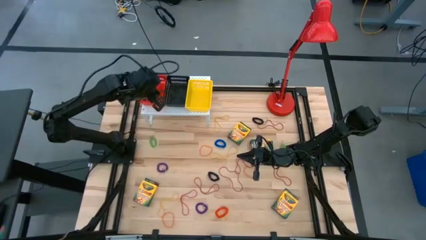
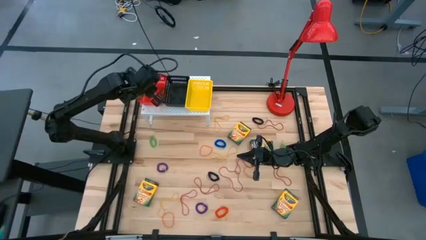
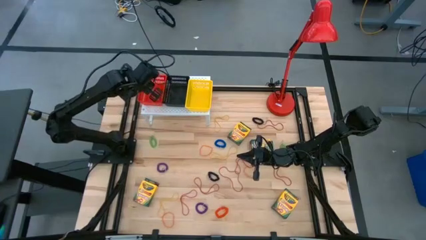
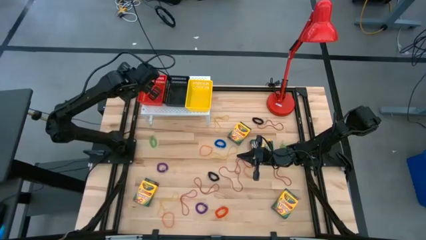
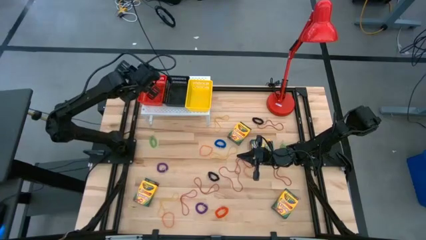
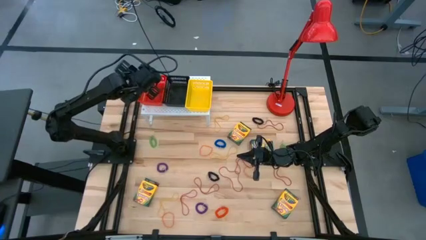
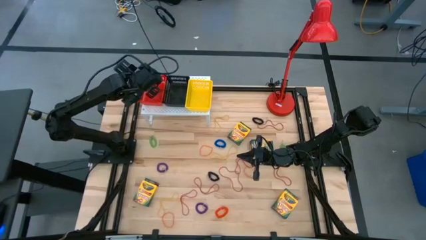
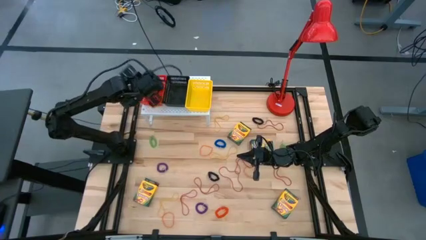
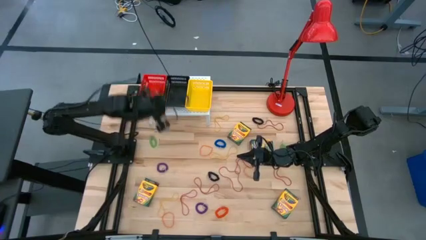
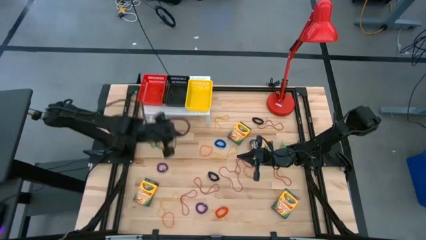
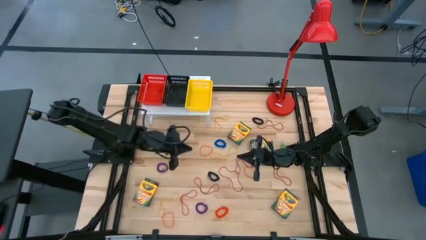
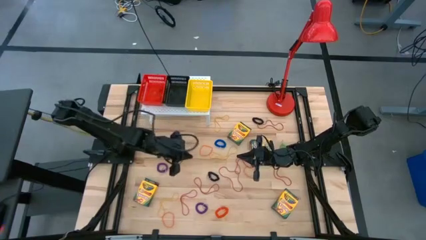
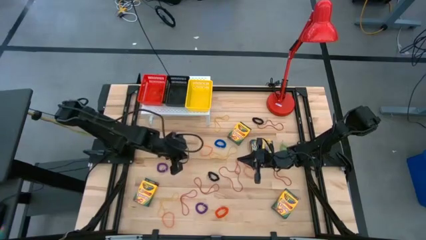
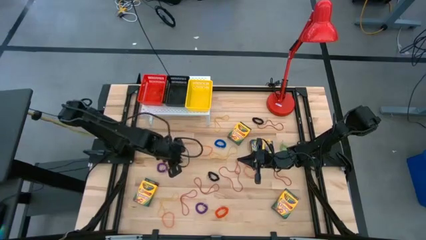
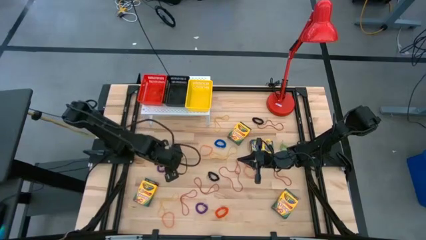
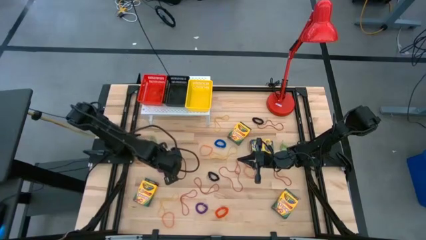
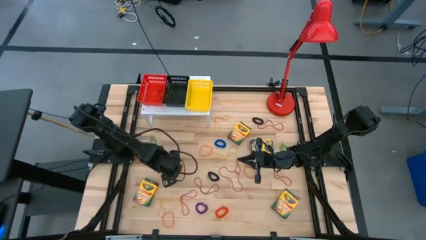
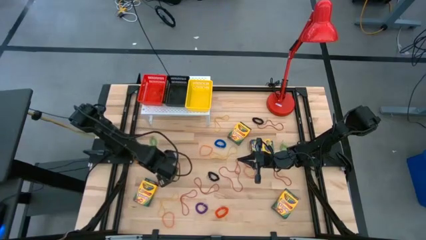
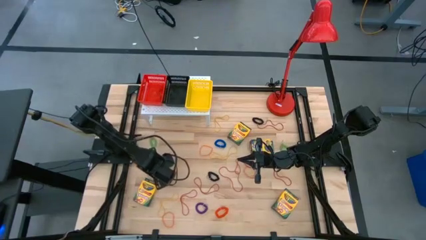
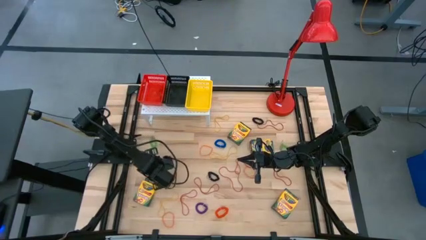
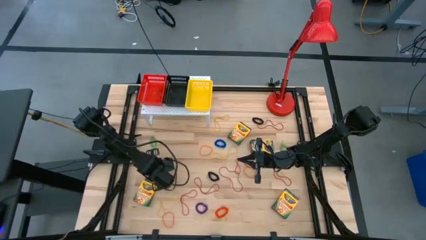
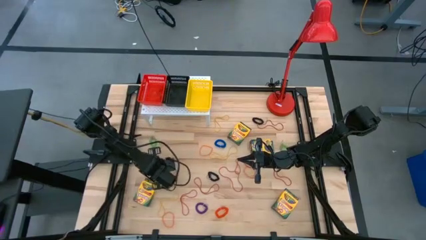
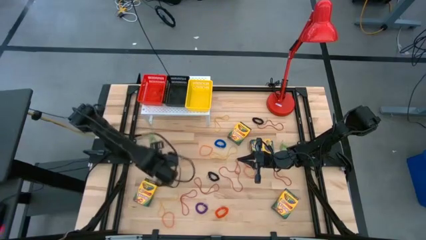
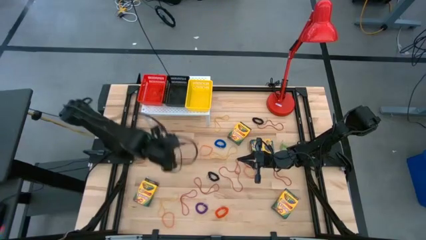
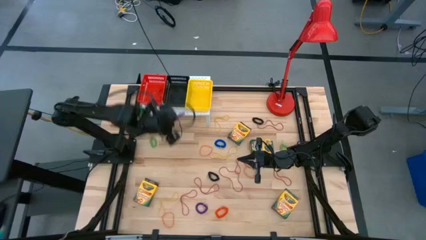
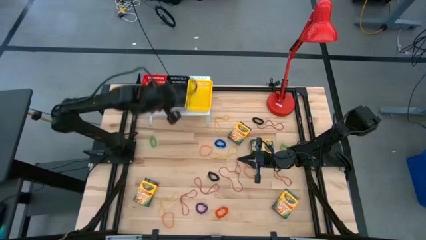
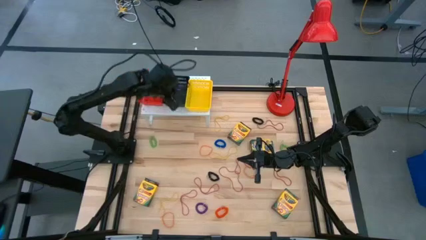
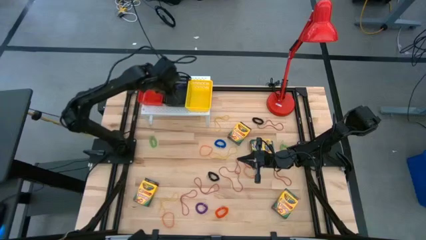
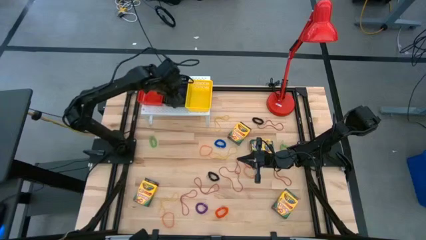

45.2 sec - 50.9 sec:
Task: Pick & Place Office Desk Supplies
Put the purple spring keychain into the black bin on the shelf

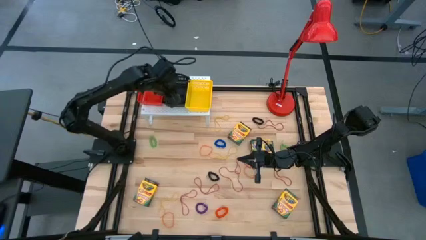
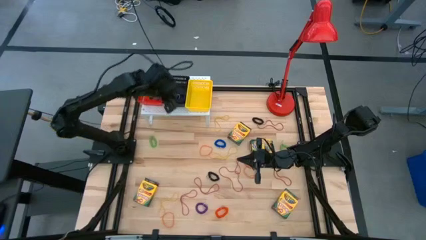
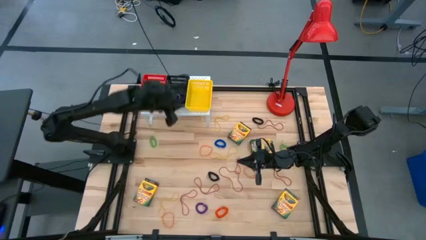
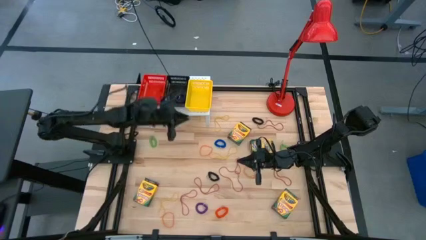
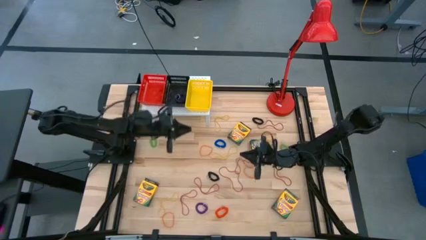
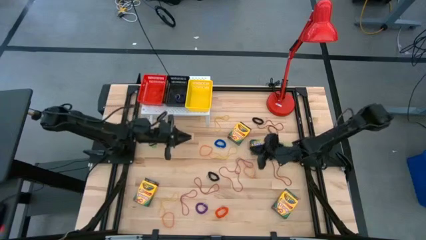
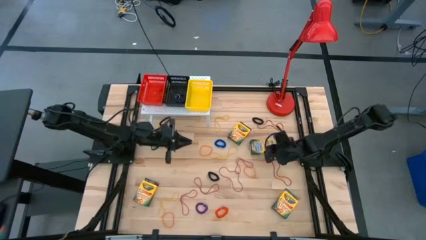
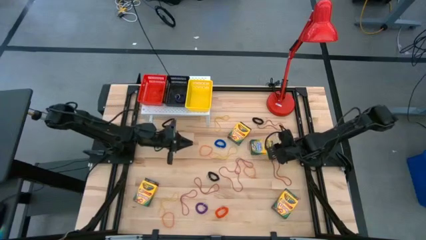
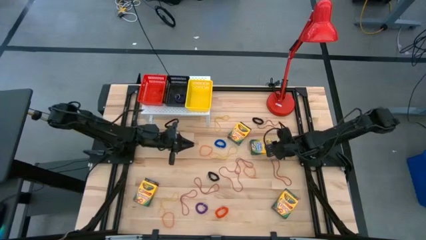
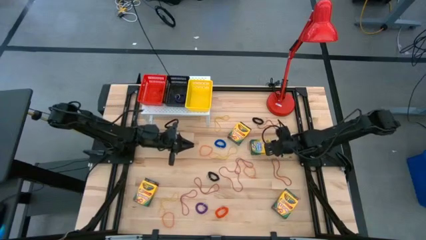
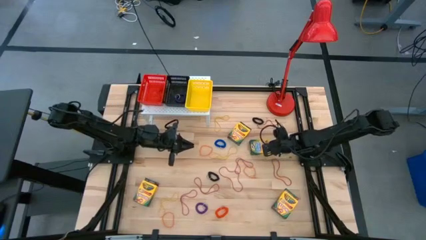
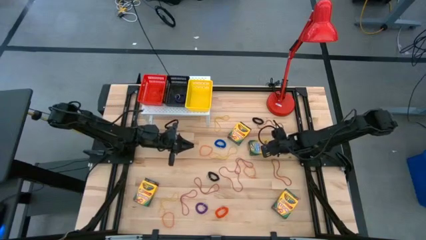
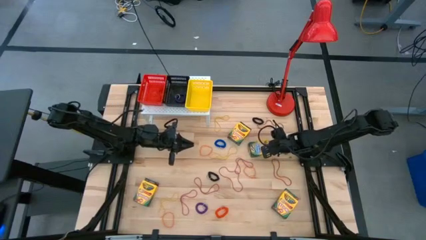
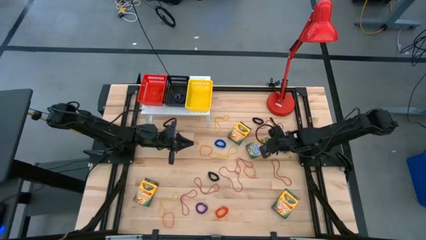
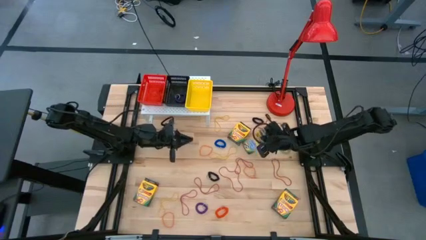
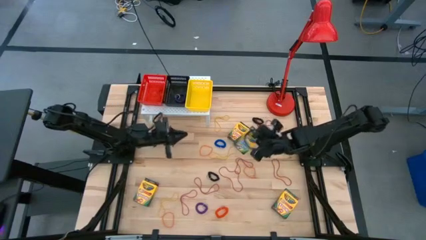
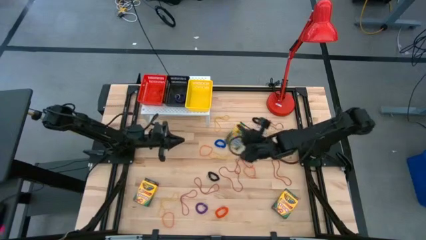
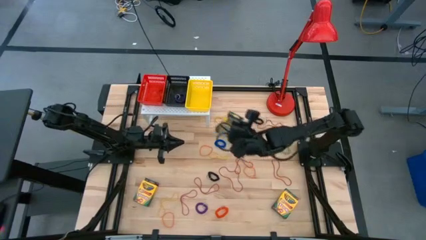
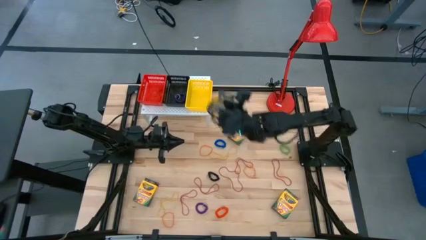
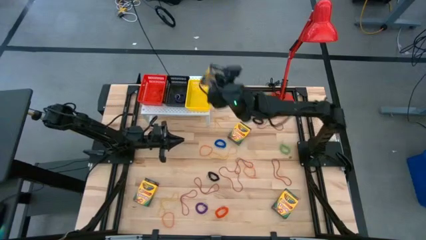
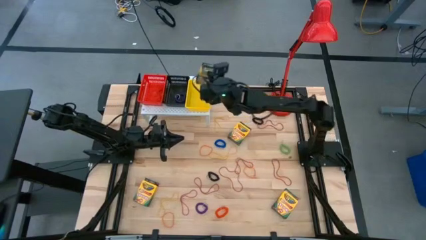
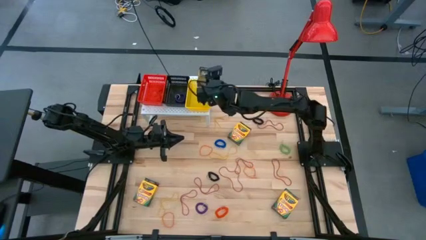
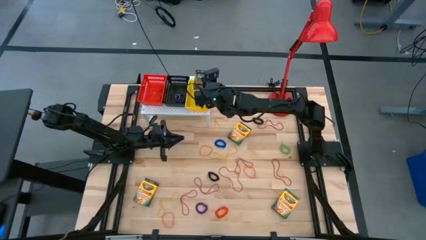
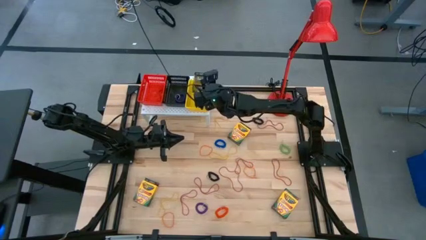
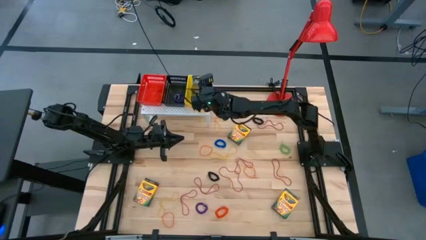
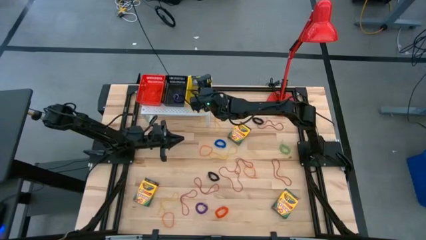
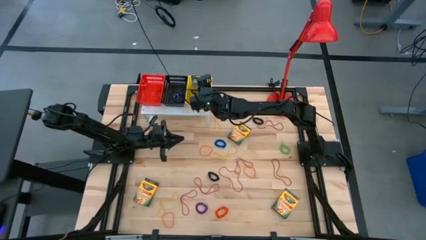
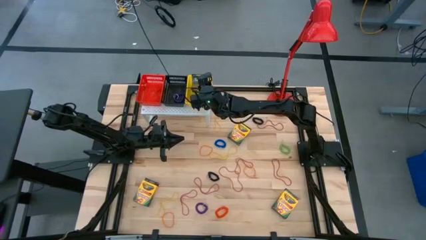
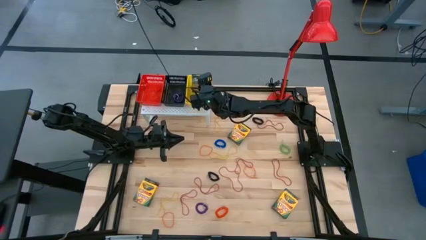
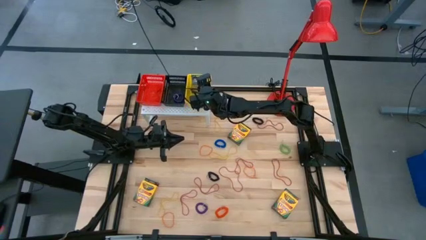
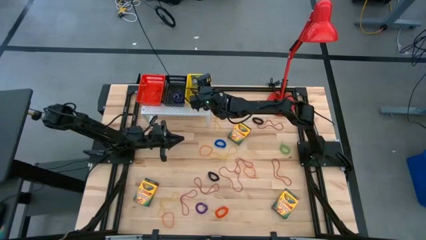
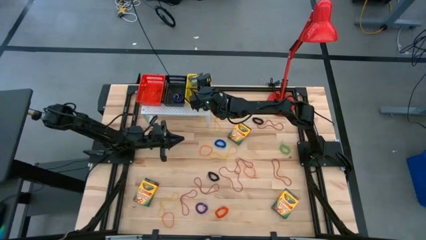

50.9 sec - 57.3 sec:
Put the crayon box into the yellow bin on the shelf

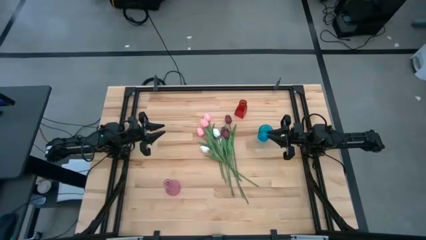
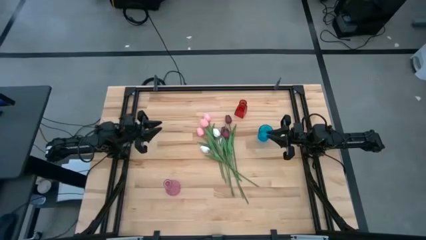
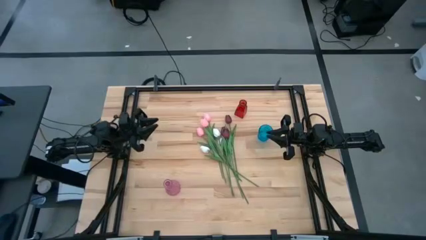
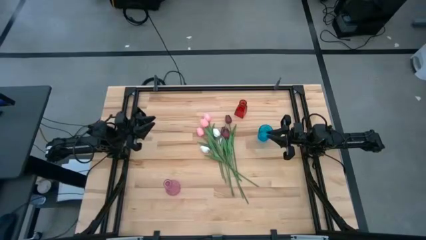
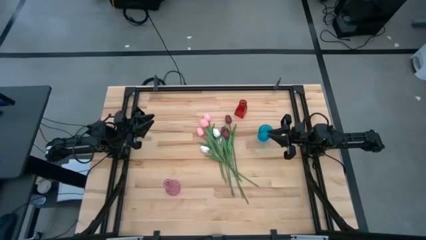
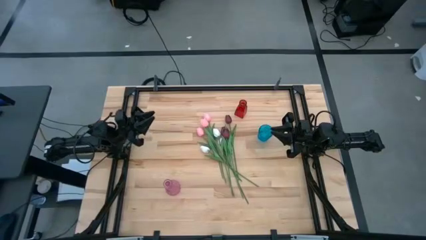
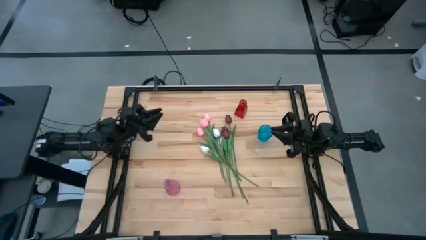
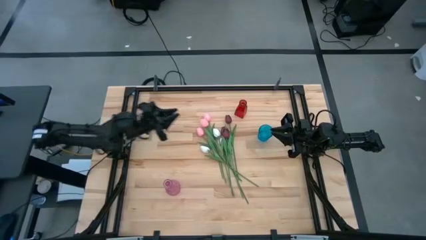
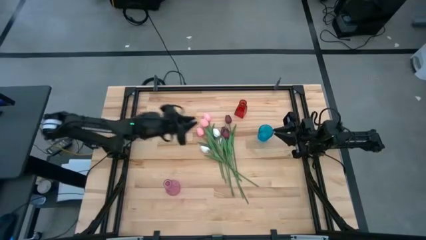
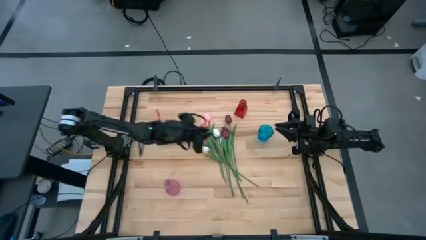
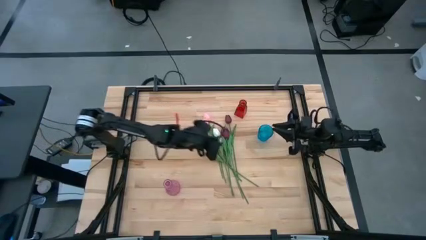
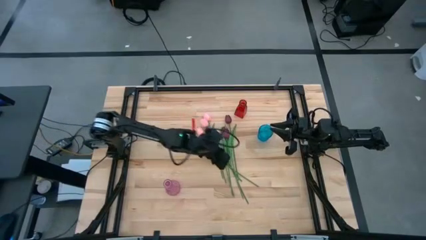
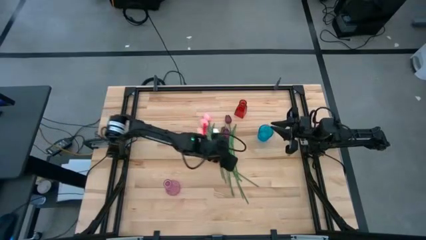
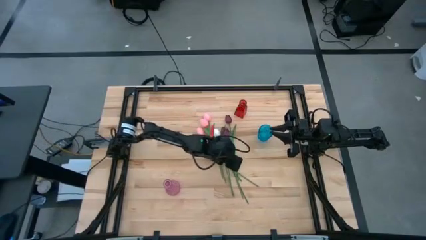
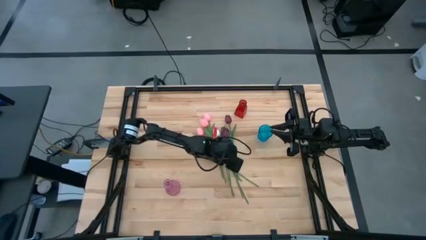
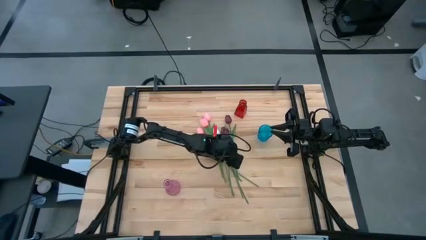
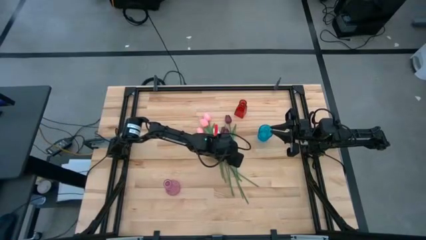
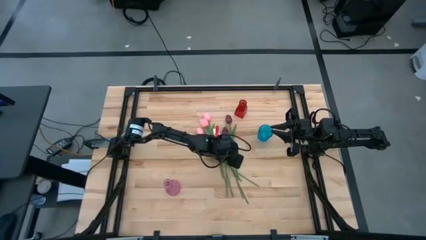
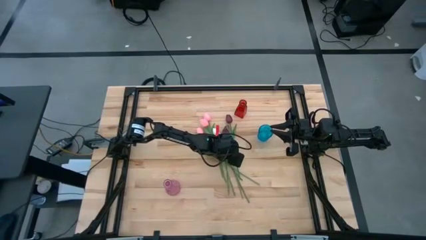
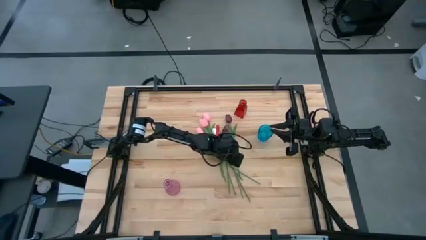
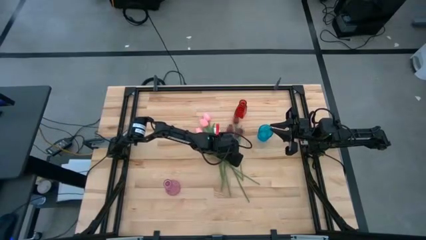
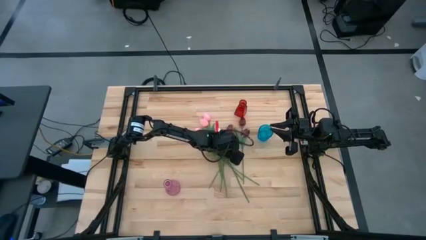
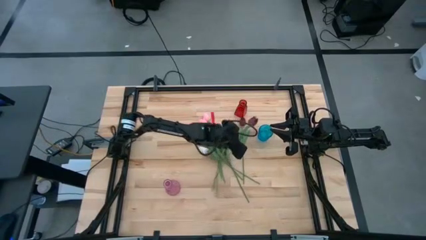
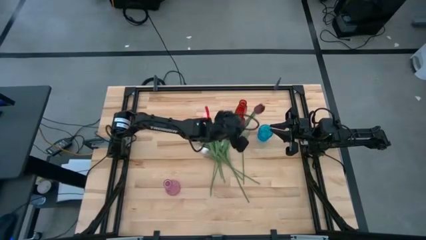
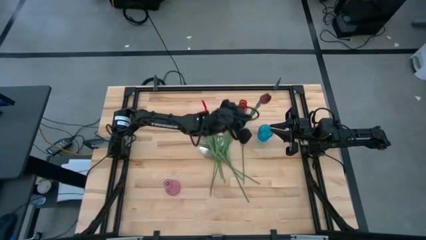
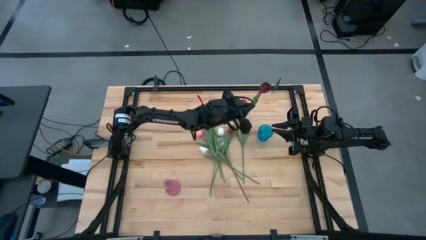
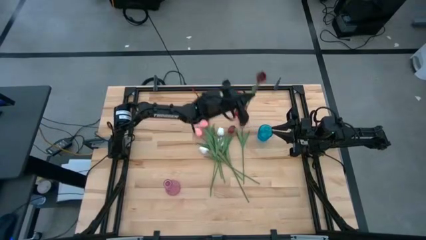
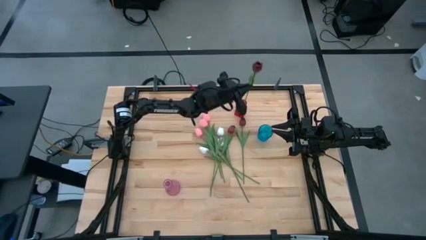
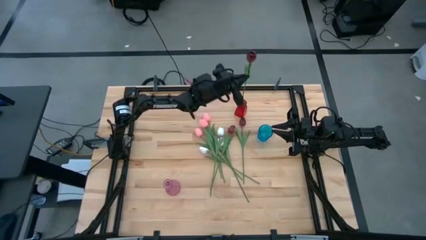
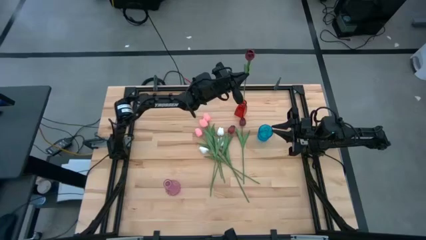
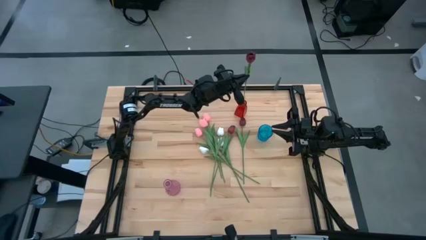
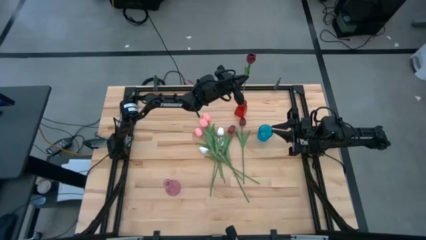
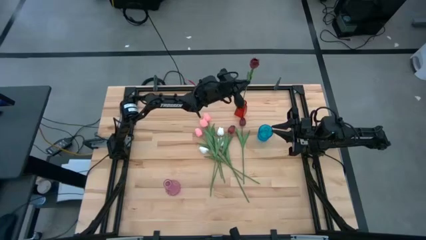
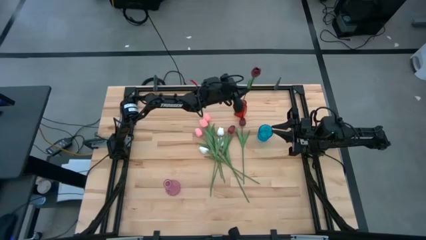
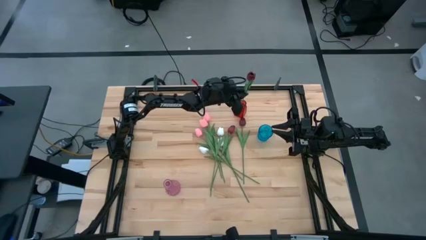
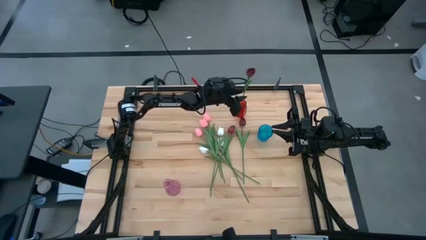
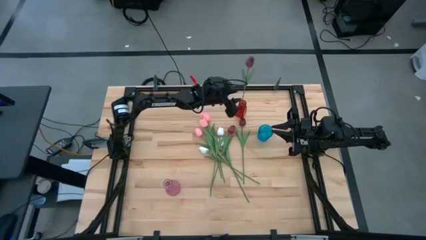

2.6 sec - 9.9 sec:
Task: Sort flowers into vase by color
Put the bottom red tulip into the red vase
